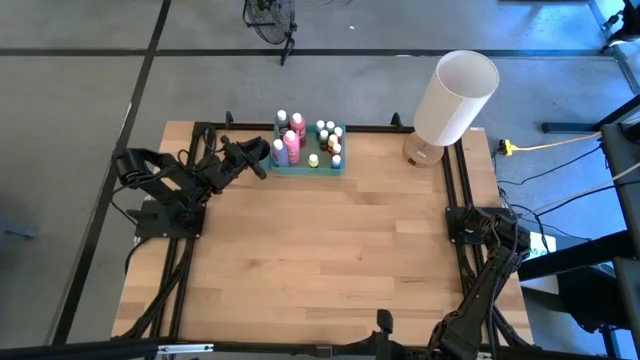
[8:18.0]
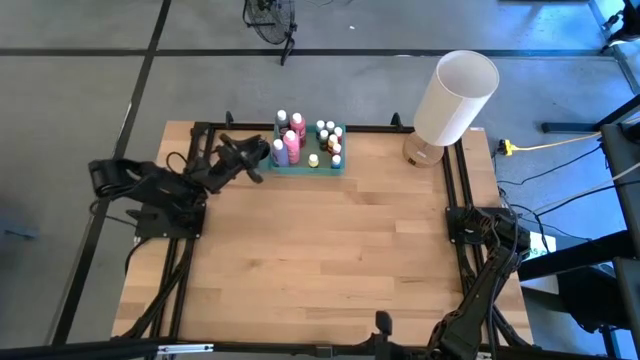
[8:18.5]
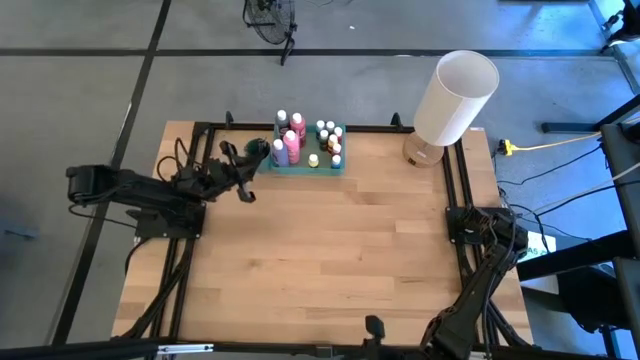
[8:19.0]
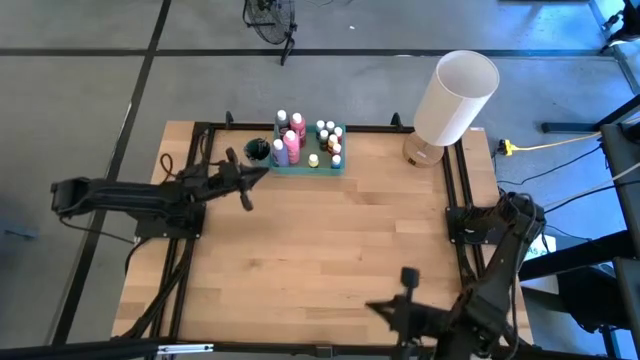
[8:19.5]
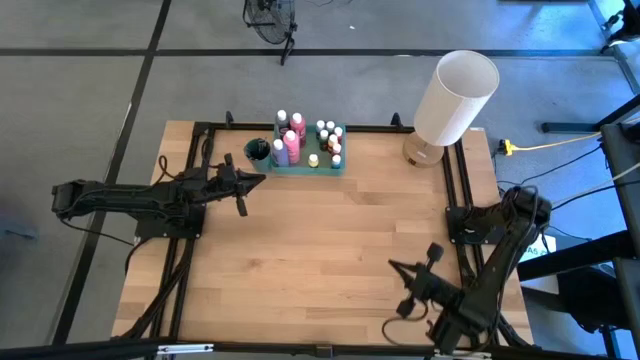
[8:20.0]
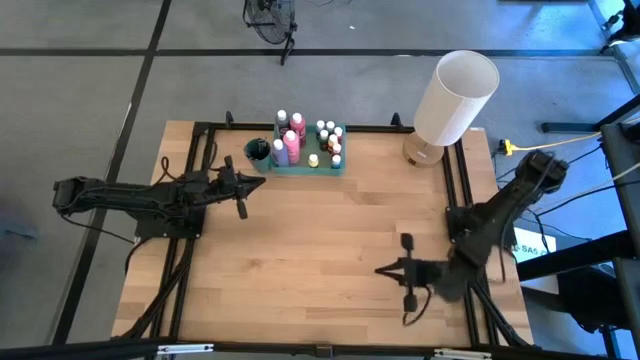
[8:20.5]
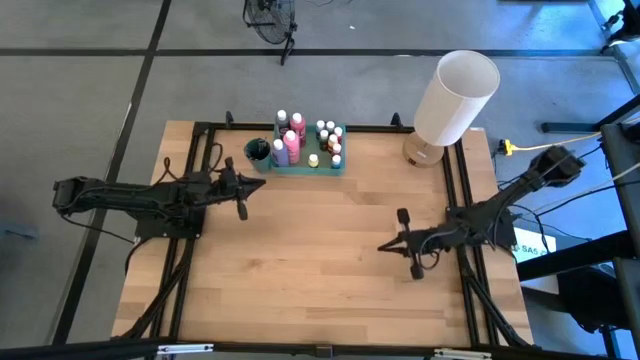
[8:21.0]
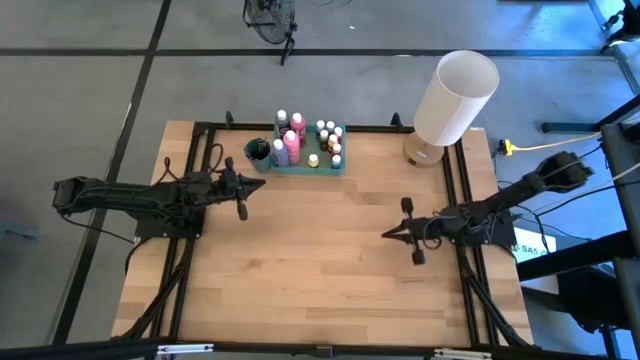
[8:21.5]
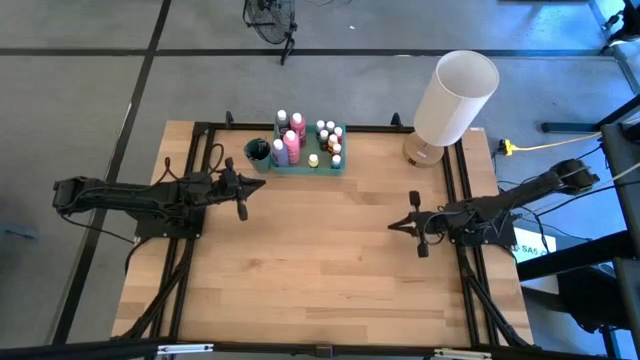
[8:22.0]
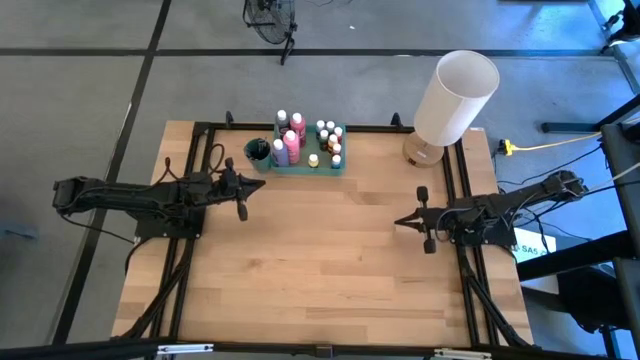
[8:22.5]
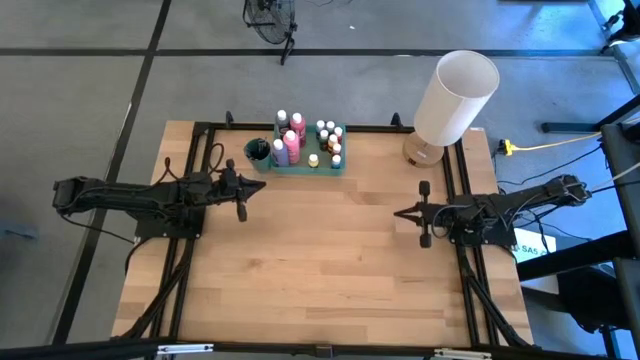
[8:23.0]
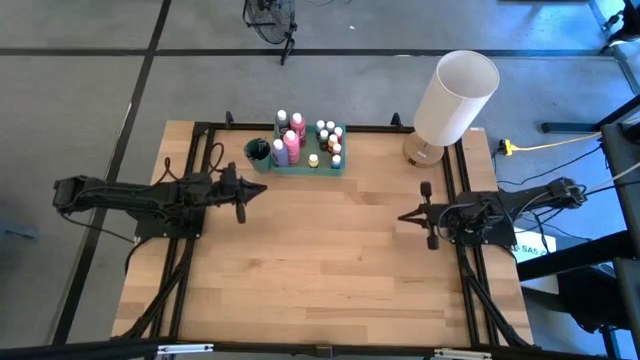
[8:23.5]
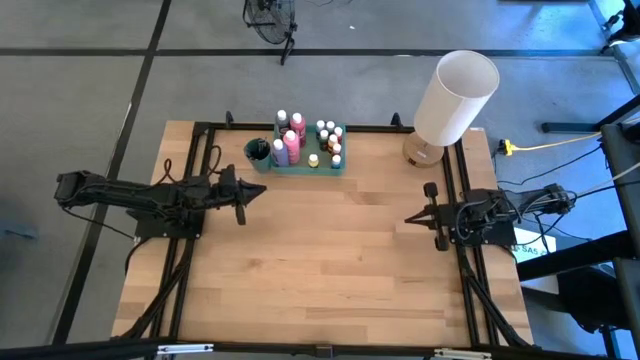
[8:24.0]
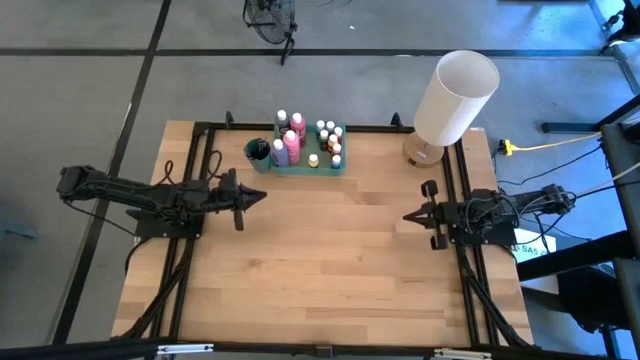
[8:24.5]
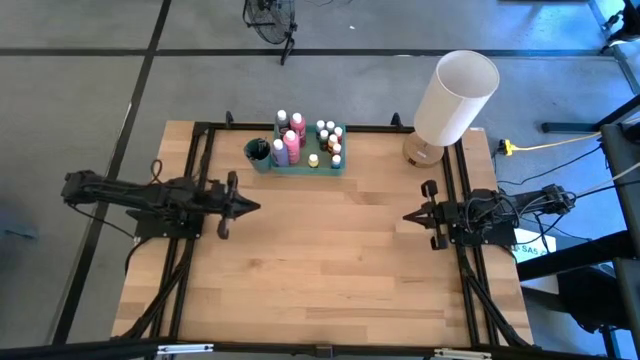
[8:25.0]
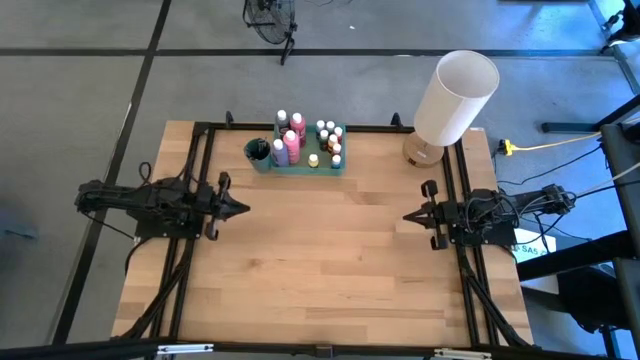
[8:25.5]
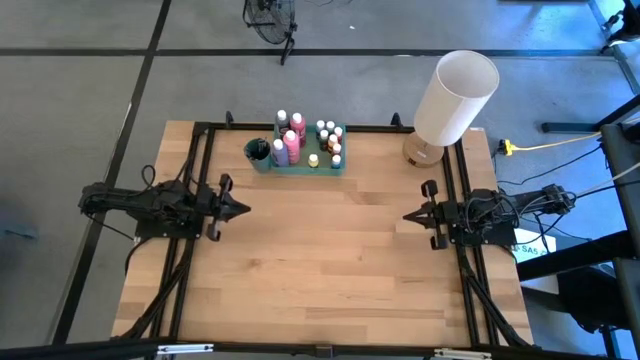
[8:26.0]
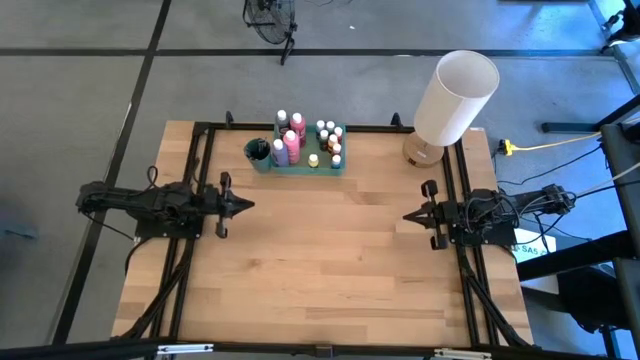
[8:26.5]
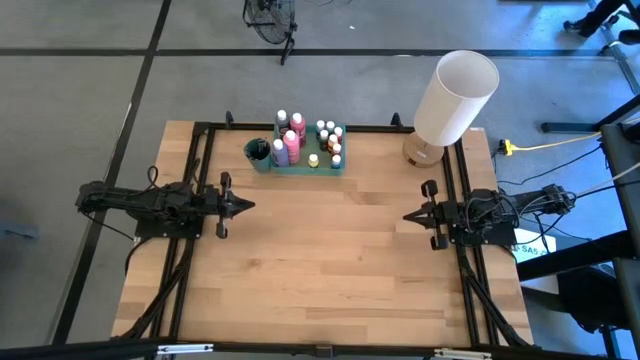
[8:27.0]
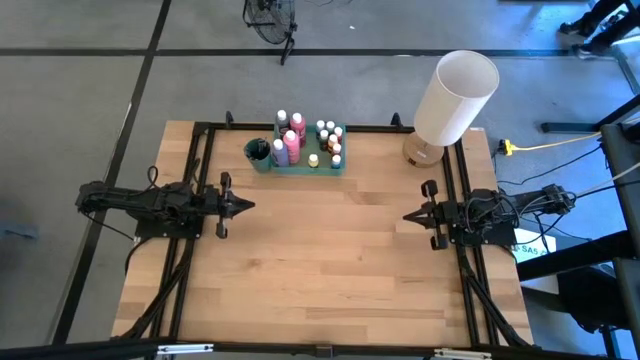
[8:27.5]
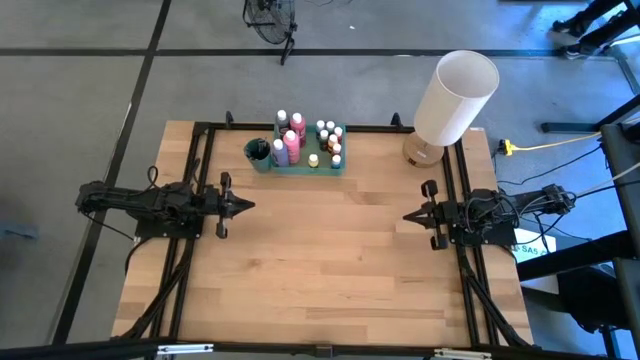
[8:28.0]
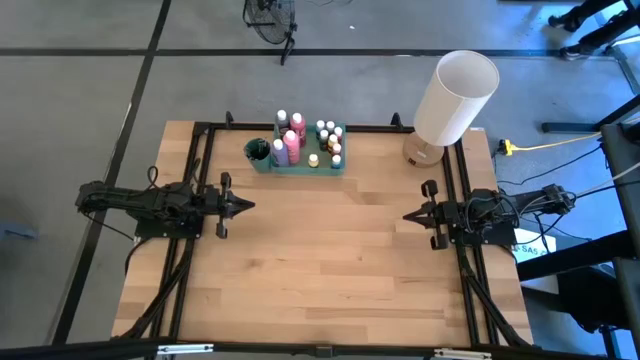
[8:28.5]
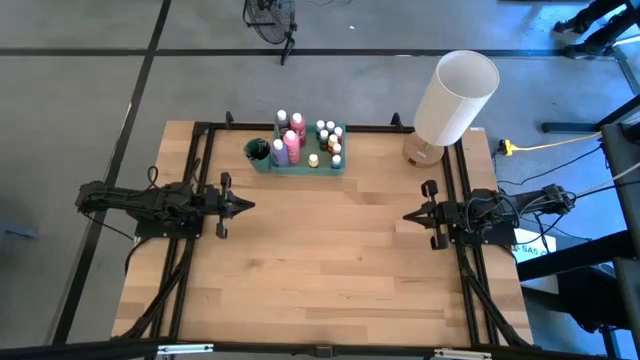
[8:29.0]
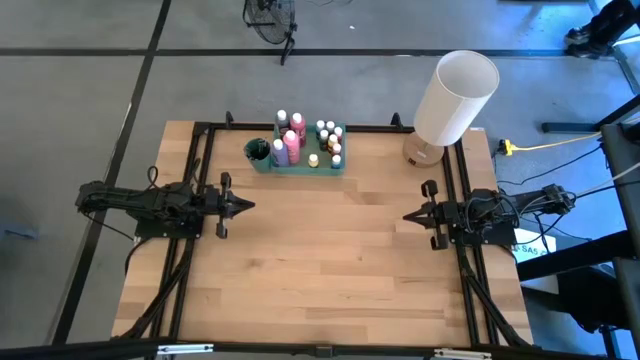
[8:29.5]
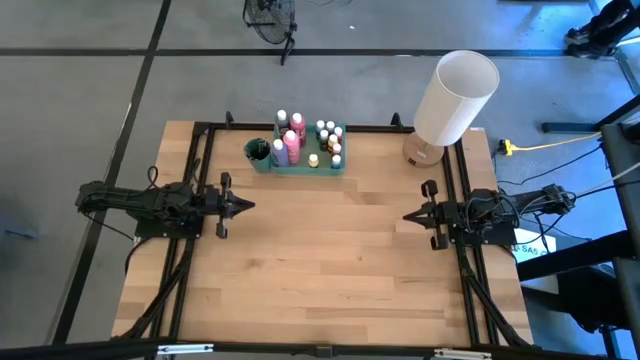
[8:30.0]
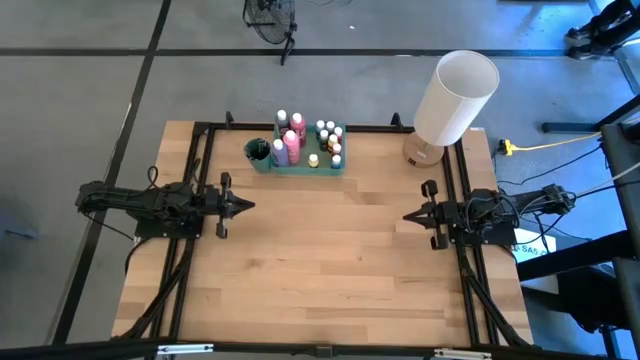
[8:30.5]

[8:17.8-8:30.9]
Task: Pick & Place Paint Supplies
Return to Home Position

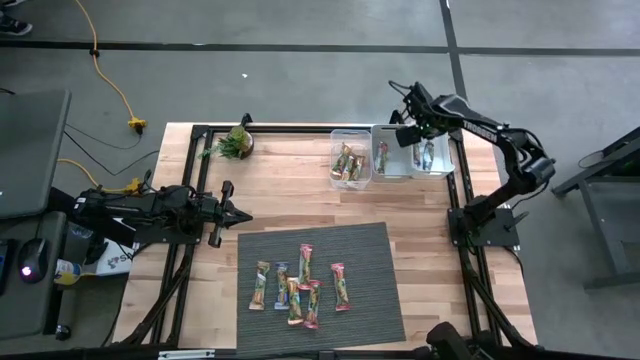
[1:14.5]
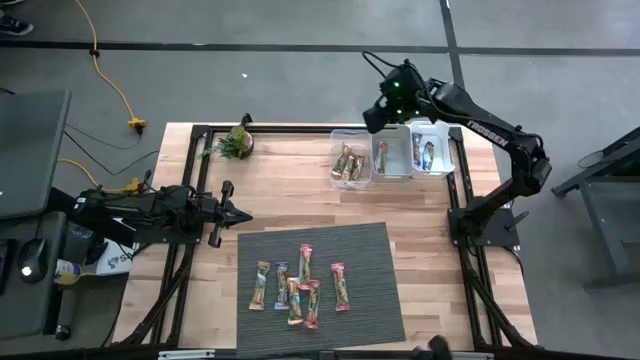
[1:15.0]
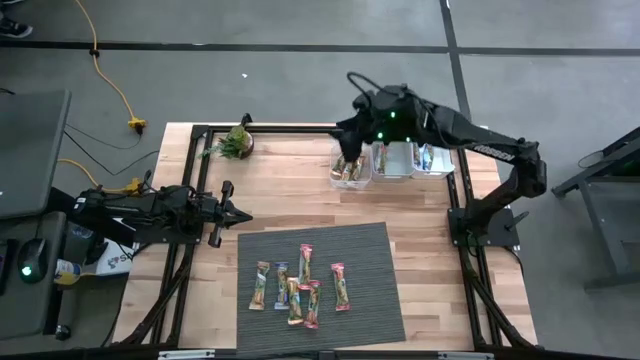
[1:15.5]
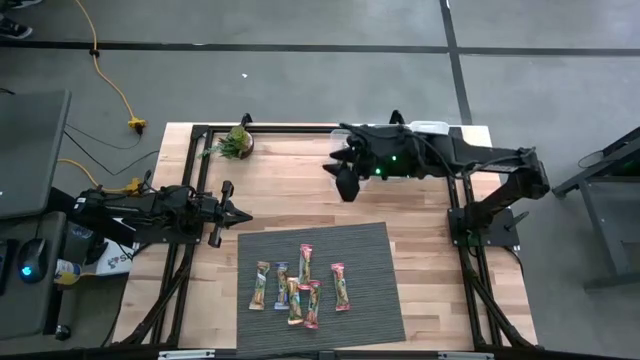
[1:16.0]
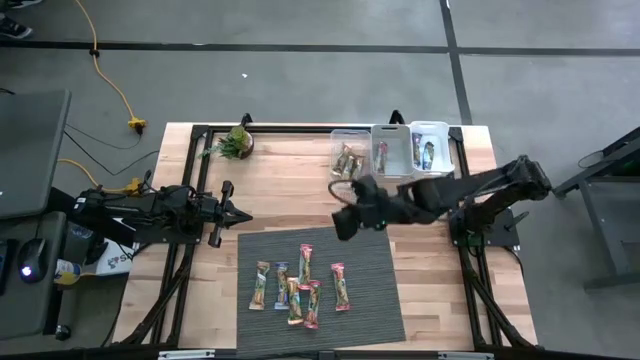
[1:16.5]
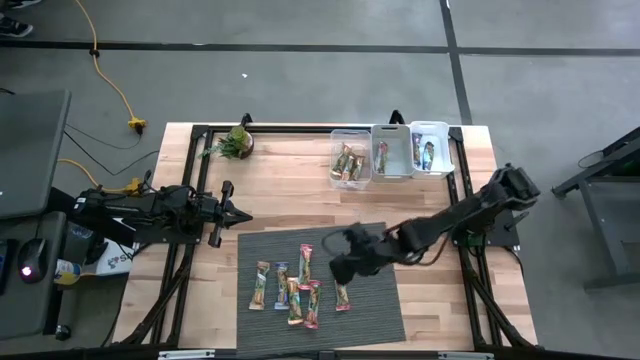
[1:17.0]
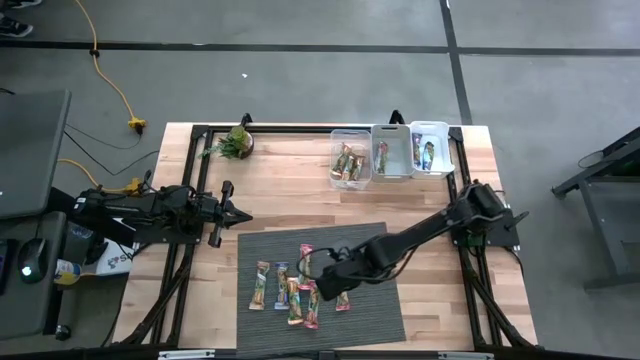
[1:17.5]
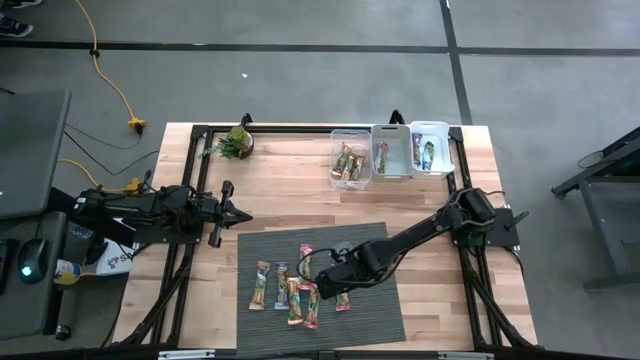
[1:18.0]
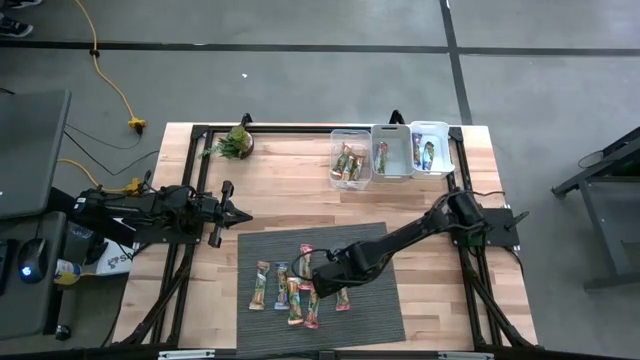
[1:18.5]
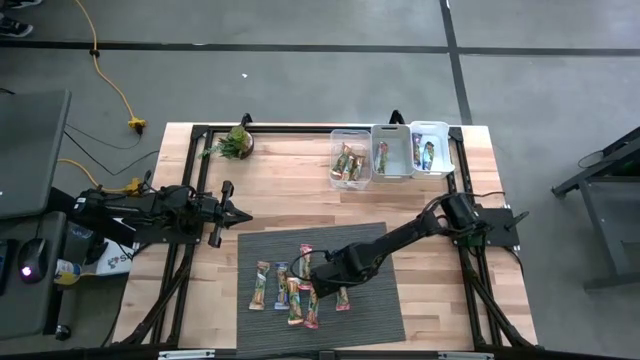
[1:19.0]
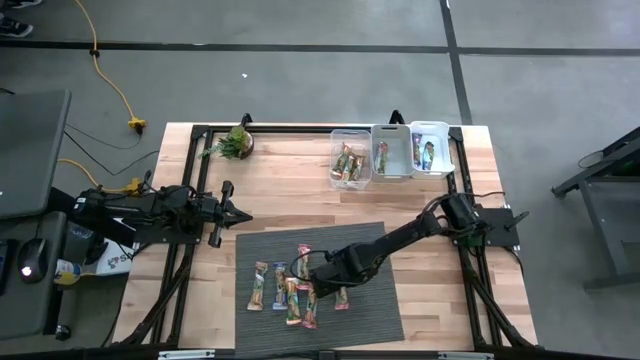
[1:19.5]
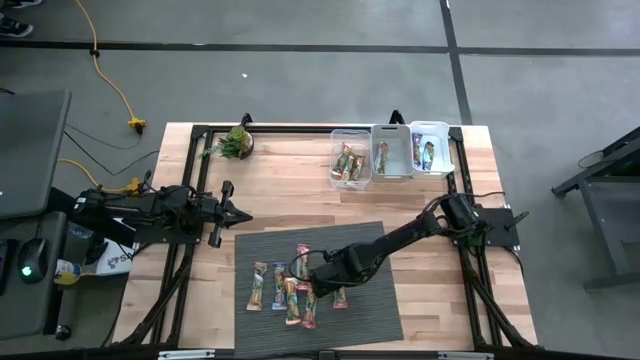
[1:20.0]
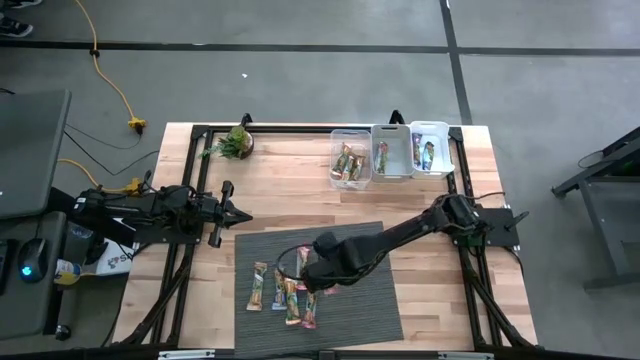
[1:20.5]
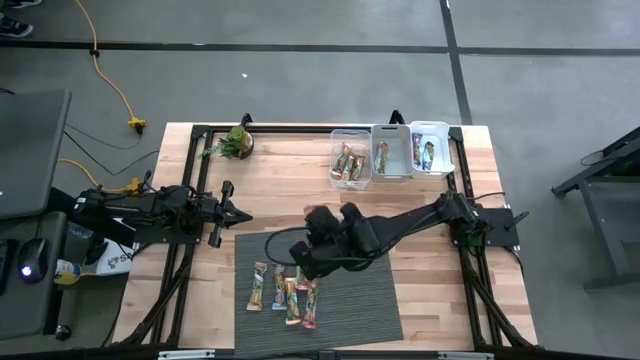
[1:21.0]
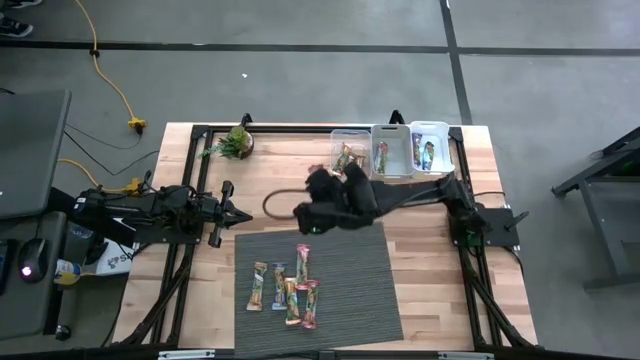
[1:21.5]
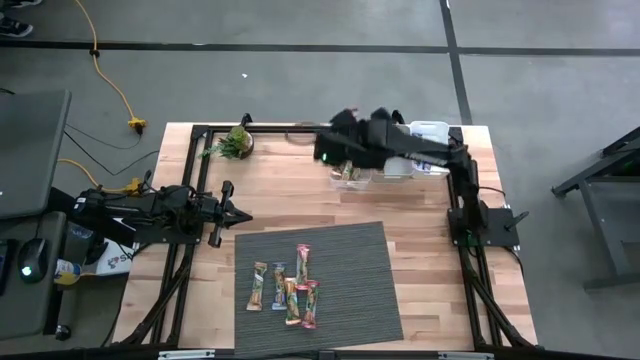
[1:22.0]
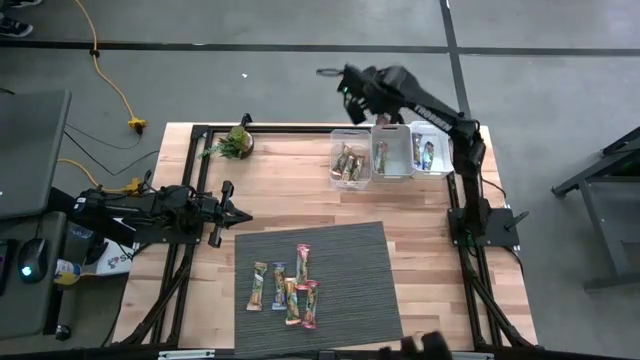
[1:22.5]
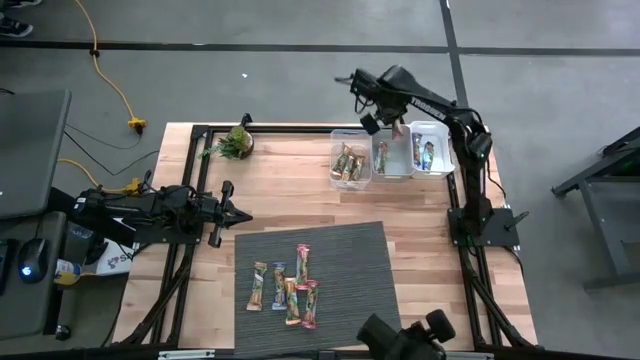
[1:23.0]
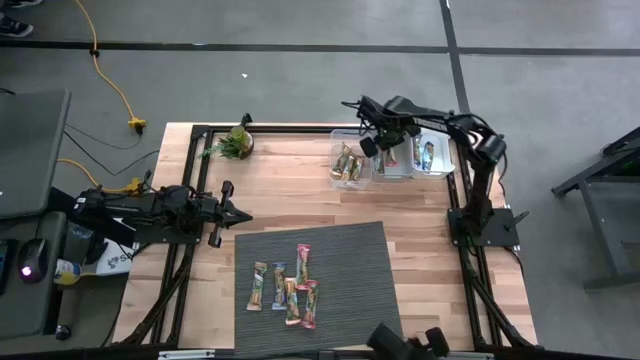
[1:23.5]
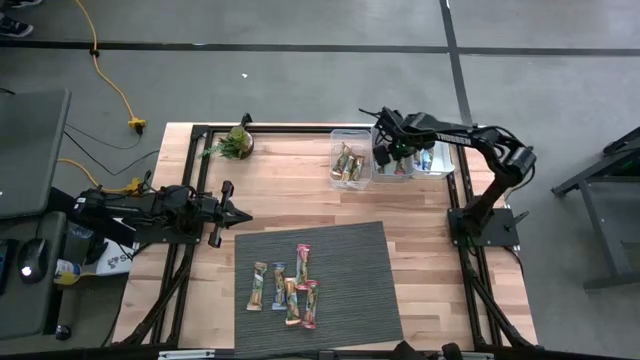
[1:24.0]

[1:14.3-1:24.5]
Task: Pick and place Granola Bars by type
Put the red granola bar into the gray bin
